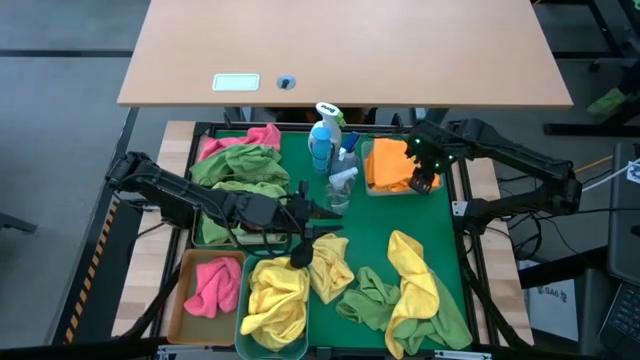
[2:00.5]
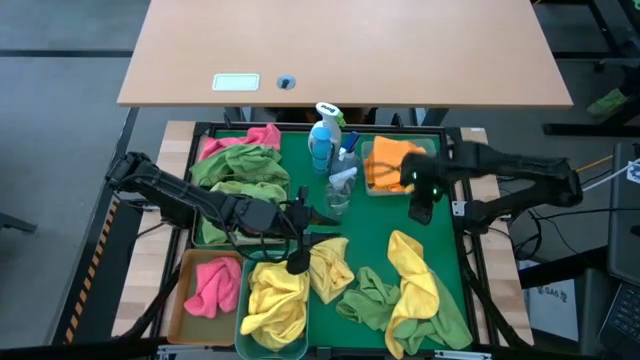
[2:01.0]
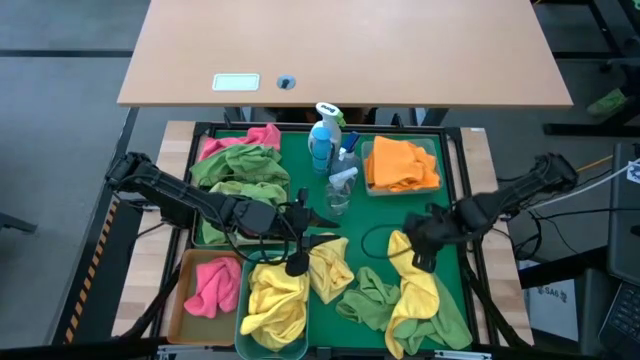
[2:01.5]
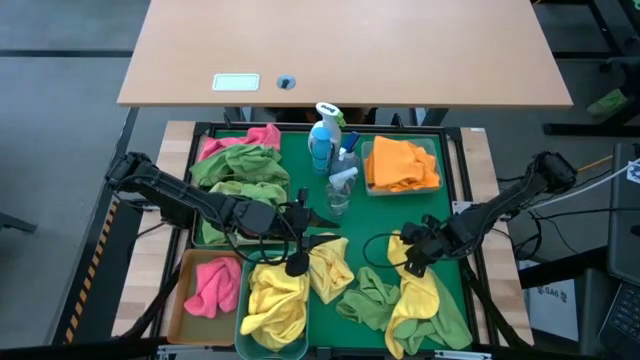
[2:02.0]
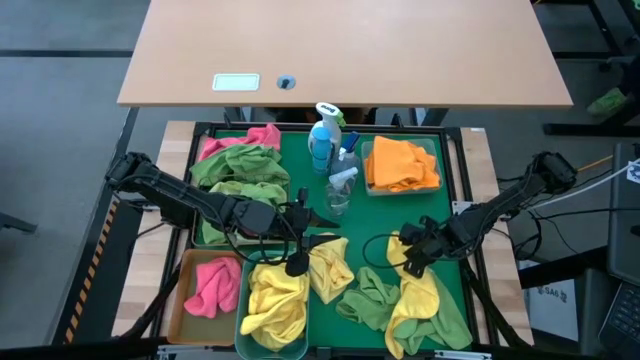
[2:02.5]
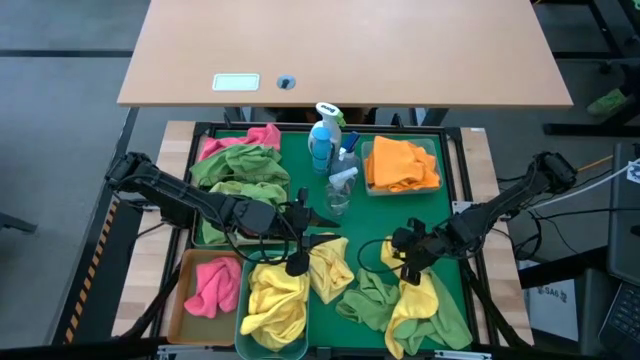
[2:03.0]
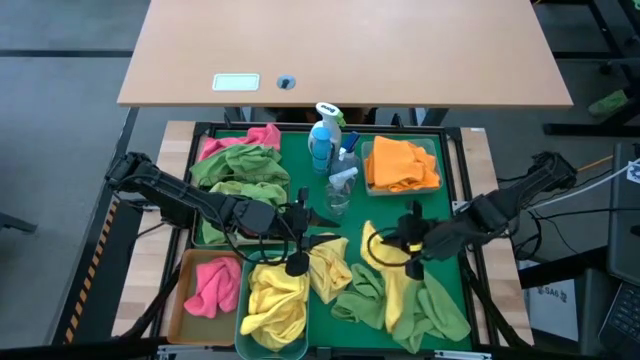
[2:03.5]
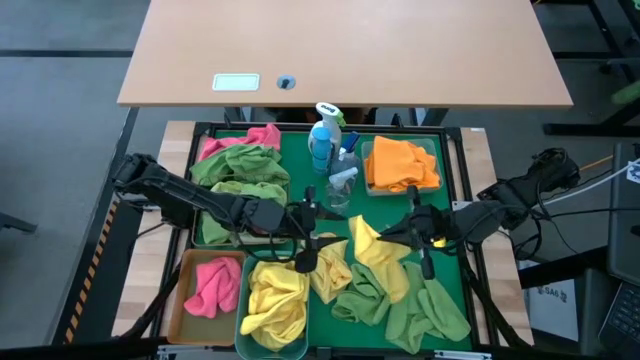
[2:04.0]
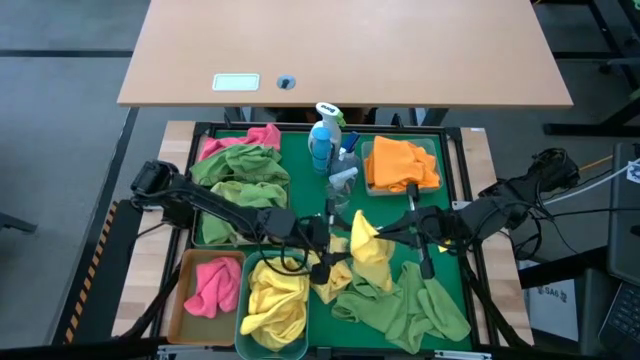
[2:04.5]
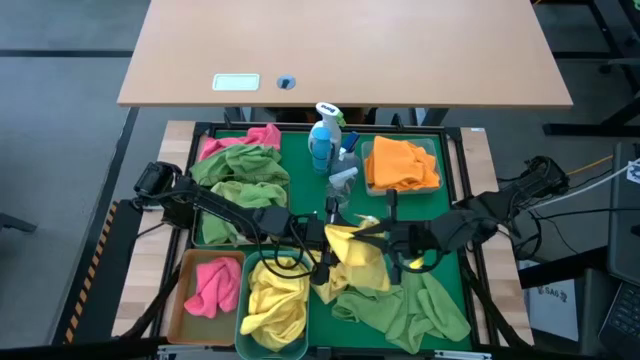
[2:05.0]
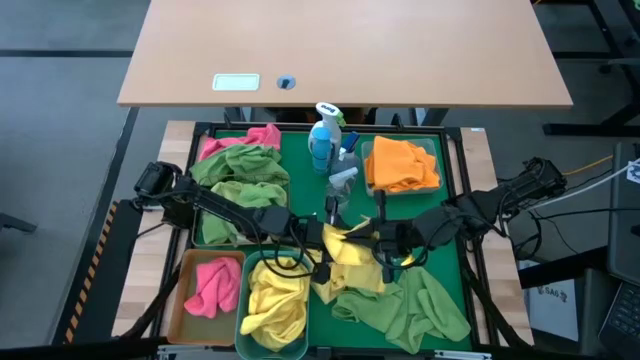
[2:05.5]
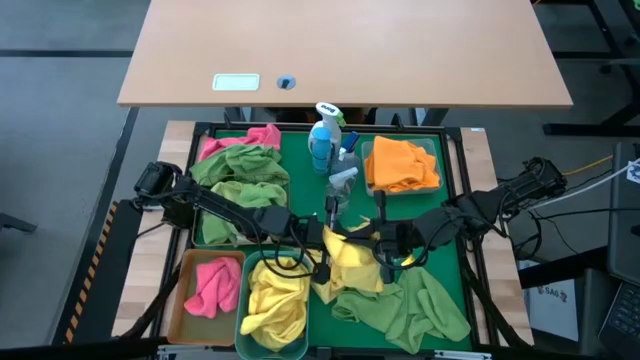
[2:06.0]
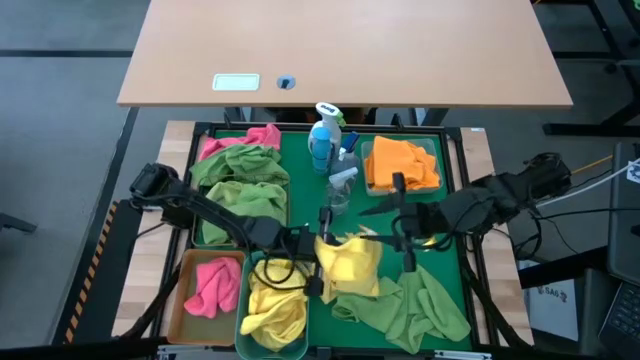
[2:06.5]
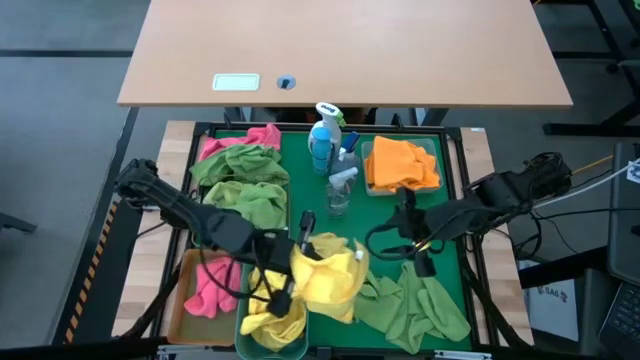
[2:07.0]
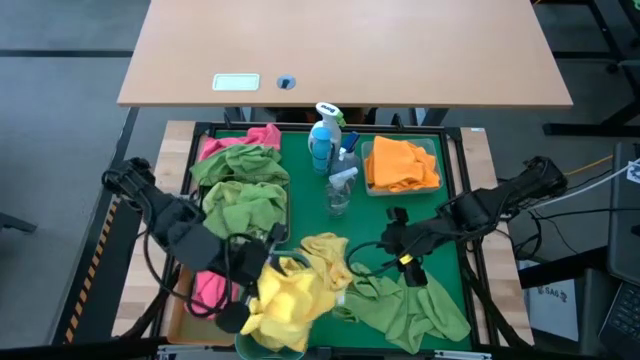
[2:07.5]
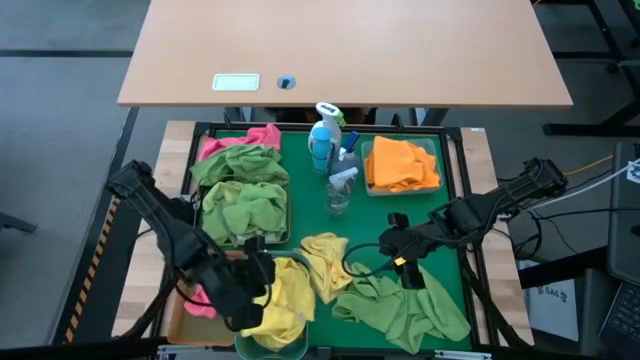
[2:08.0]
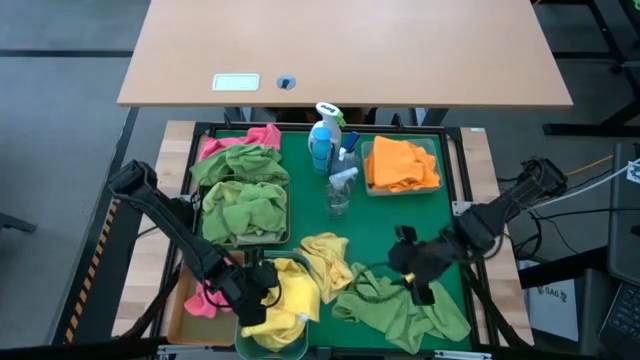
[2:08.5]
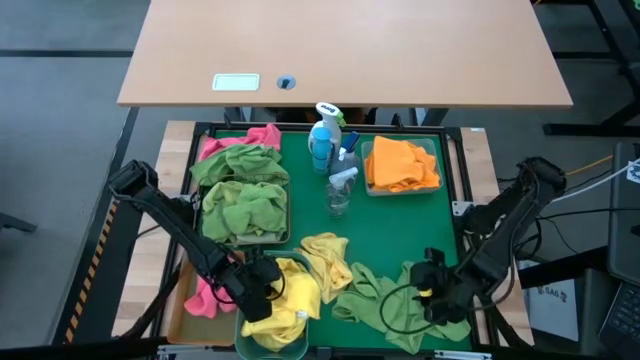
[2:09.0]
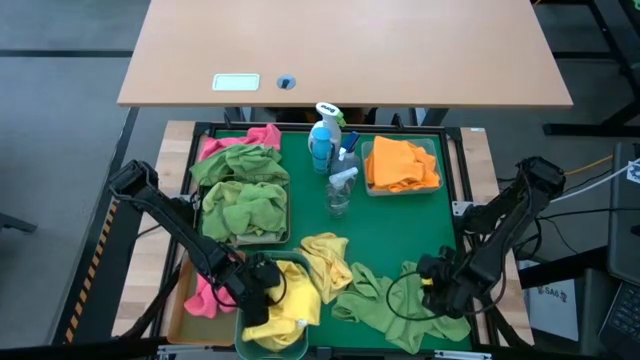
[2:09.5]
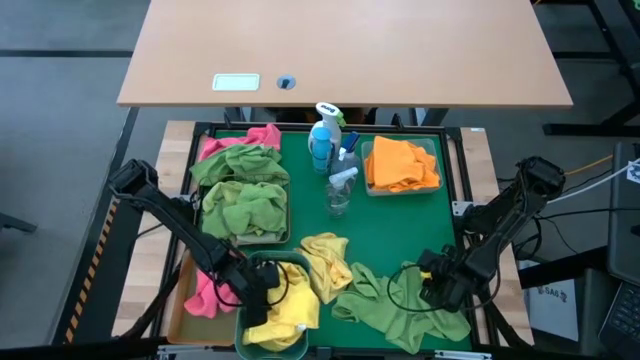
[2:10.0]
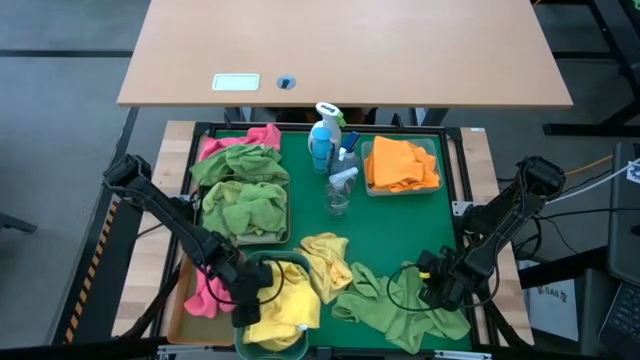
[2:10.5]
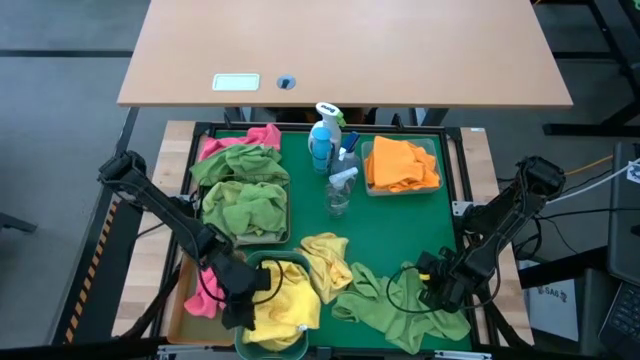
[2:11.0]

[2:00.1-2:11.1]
Task: Sort microfiber towel by color & place in baskets
Put the yellow towel into the blue bin

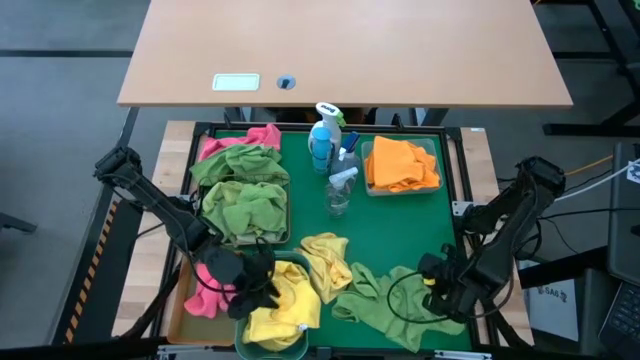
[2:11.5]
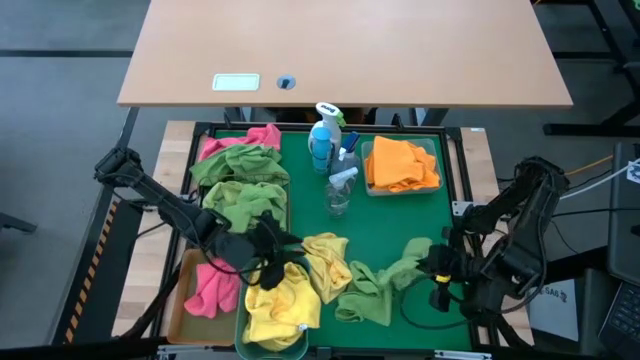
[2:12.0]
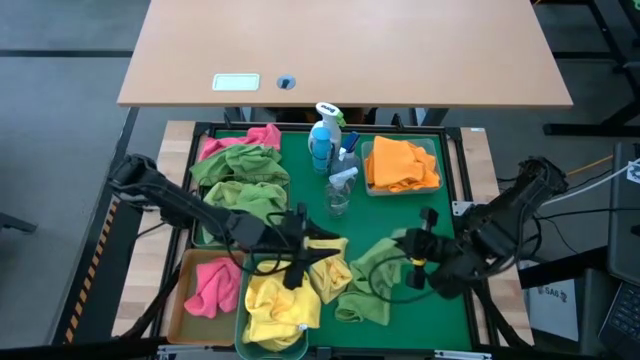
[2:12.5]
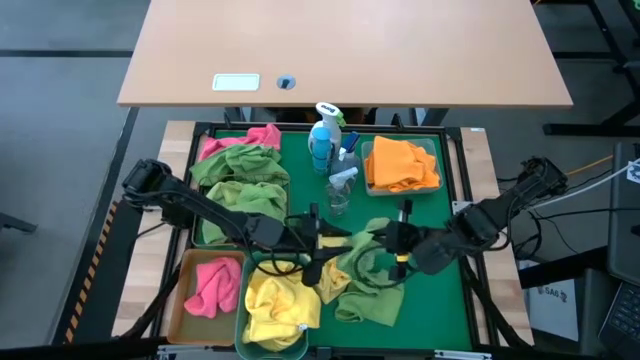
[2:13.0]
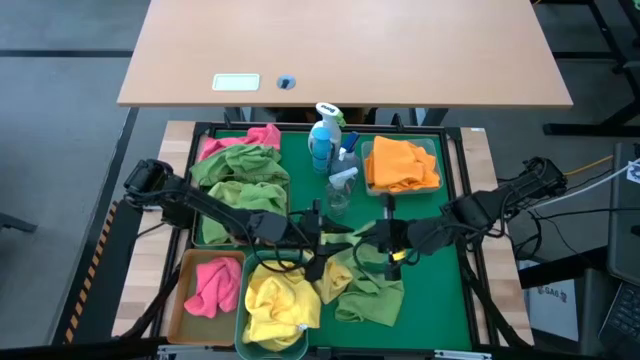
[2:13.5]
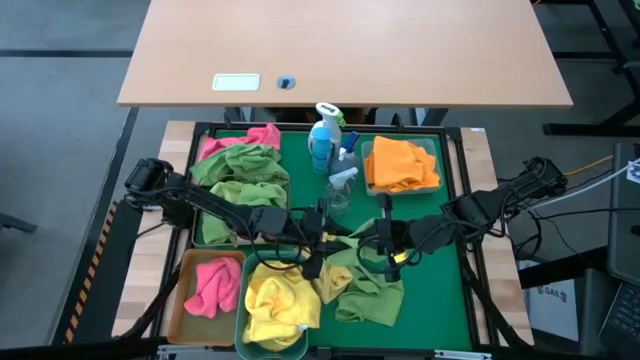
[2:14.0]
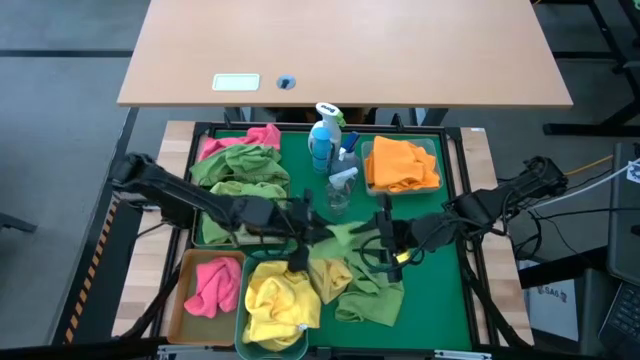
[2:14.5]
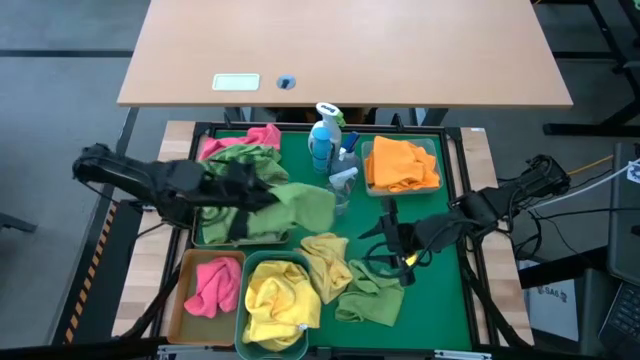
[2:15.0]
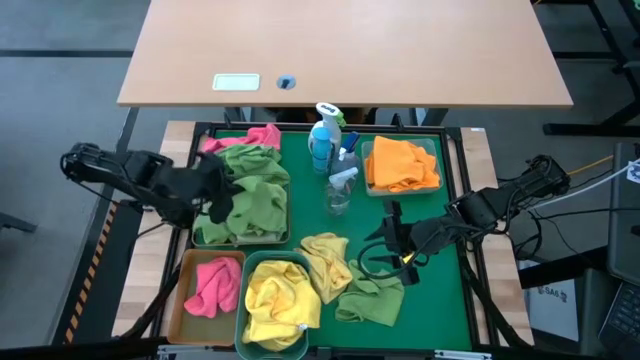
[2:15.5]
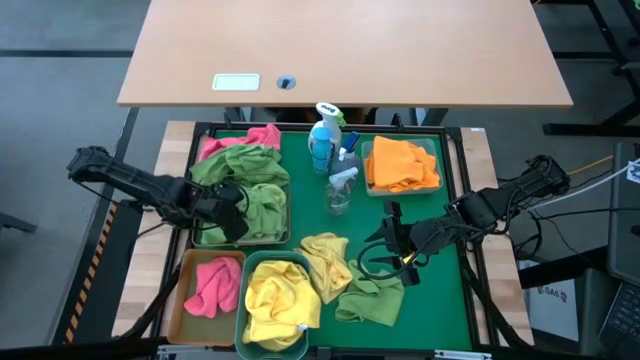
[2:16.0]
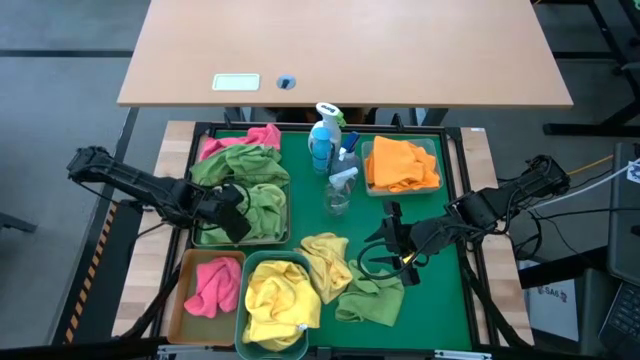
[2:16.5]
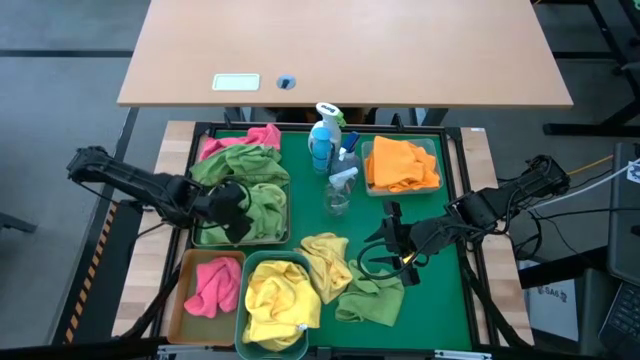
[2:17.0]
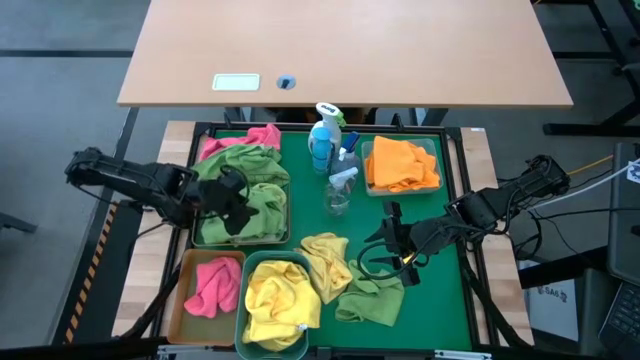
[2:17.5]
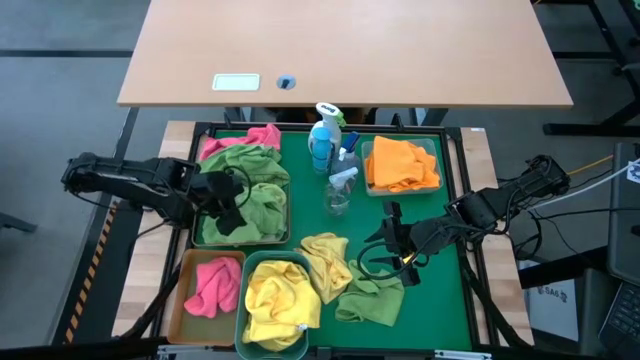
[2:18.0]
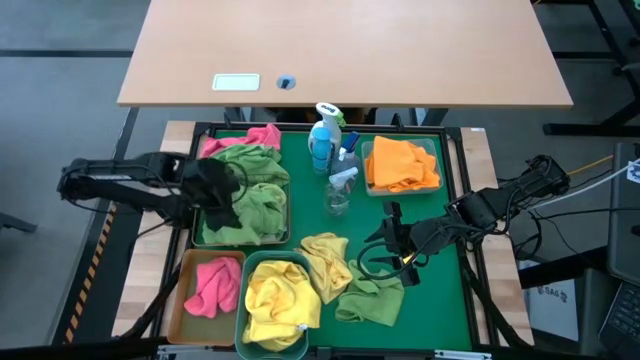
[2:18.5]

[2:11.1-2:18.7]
Put the green towel into the wire basket

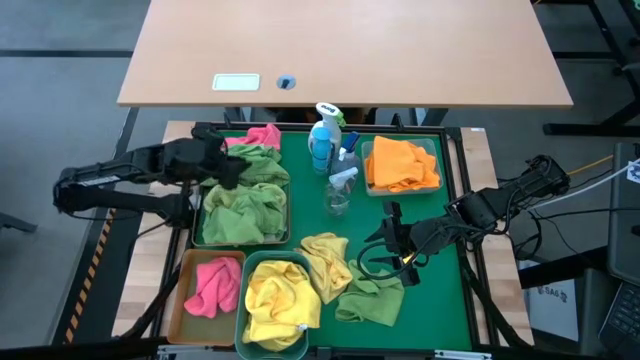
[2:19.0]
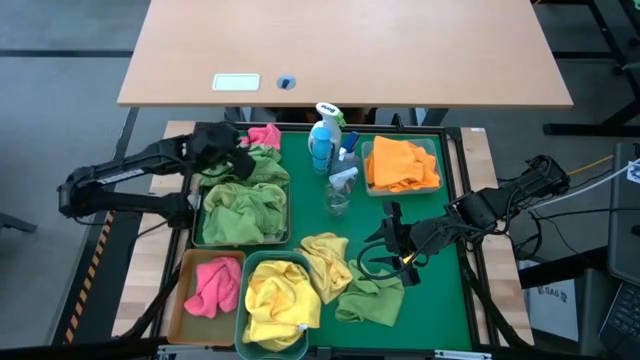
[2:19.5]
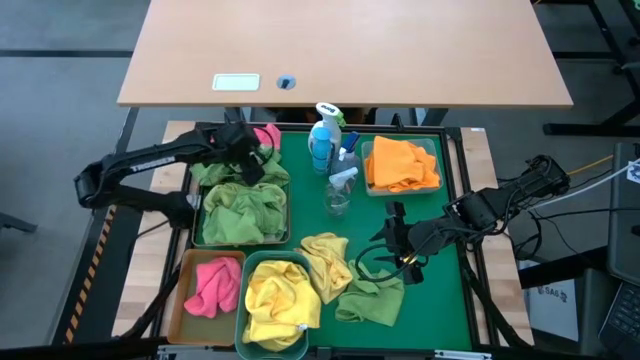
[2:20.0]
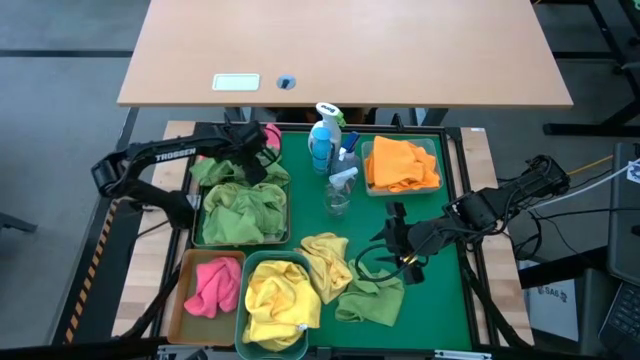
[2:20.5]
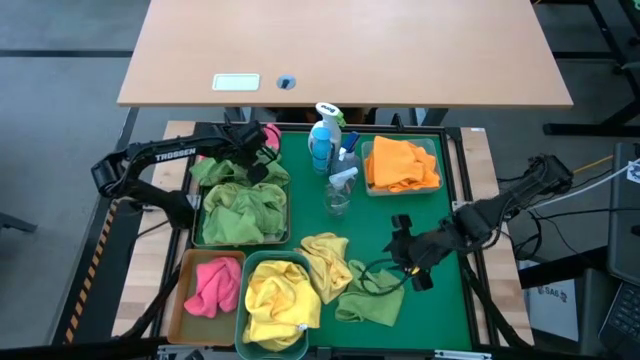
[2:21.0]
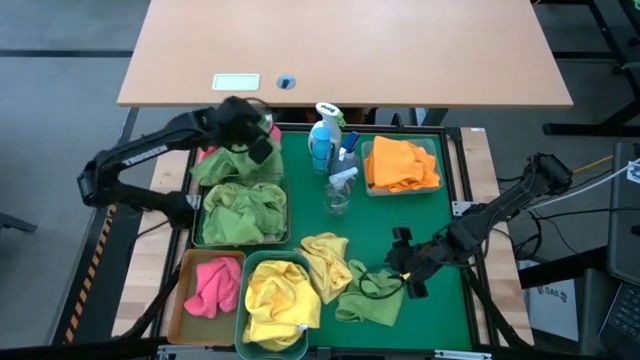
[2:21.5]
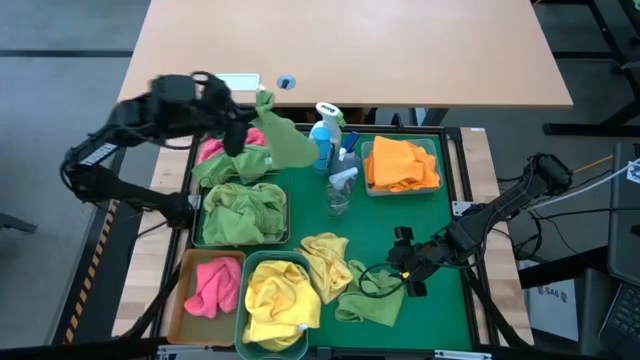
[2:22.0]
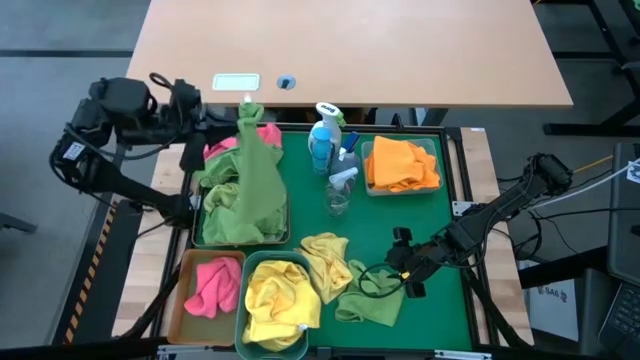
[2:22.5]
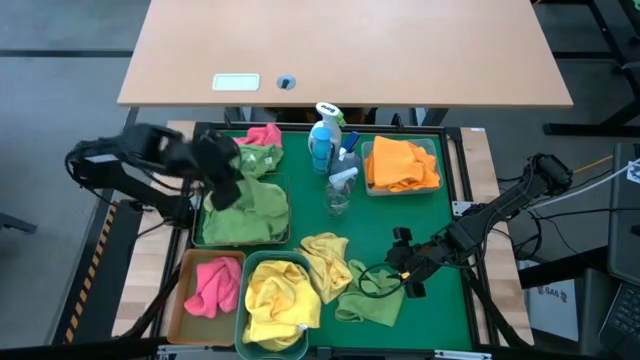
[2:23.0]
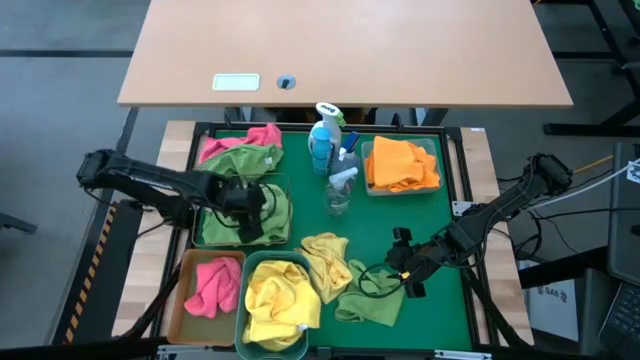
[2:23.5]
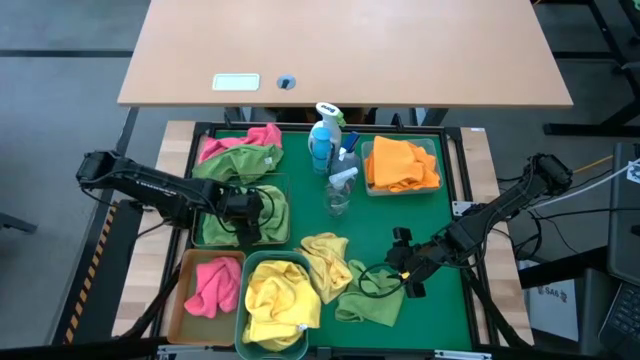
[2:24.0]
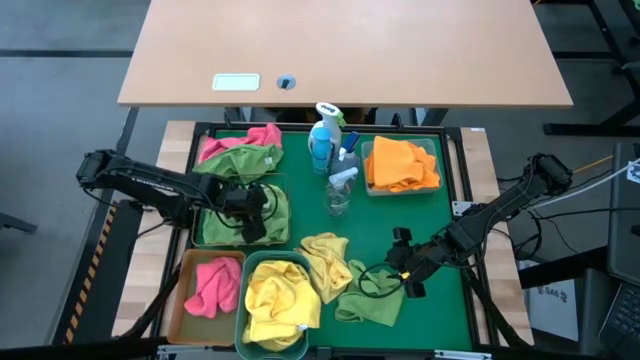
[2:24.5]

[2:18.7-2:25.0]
Put the green towel into the wire basket
